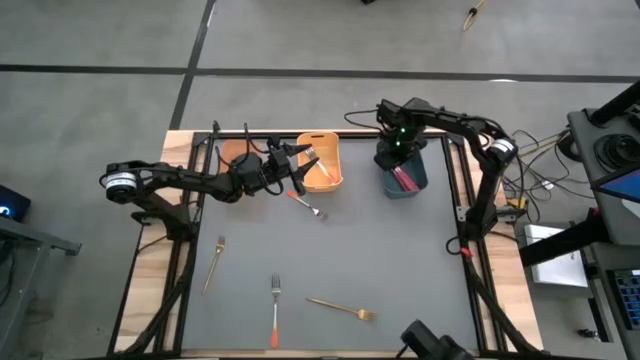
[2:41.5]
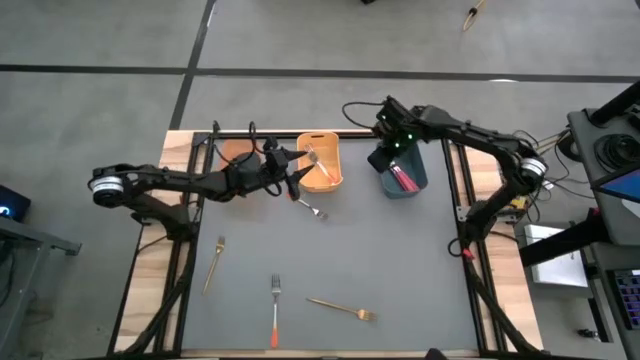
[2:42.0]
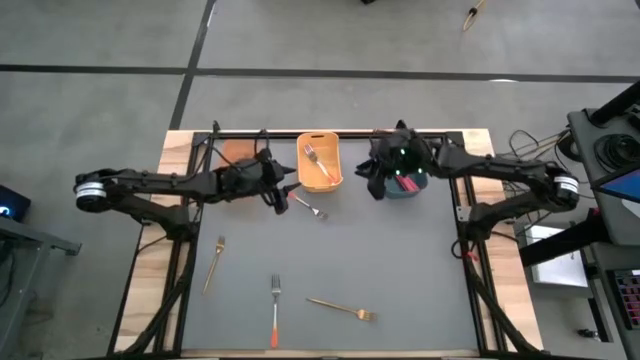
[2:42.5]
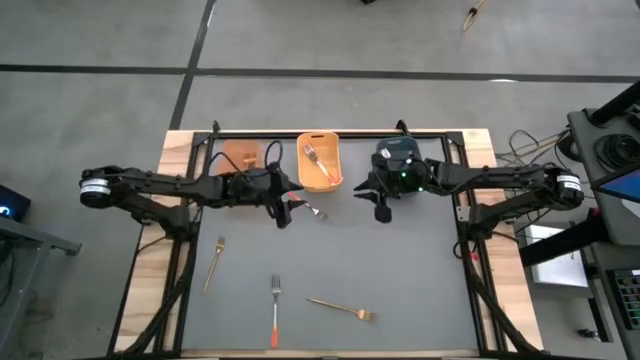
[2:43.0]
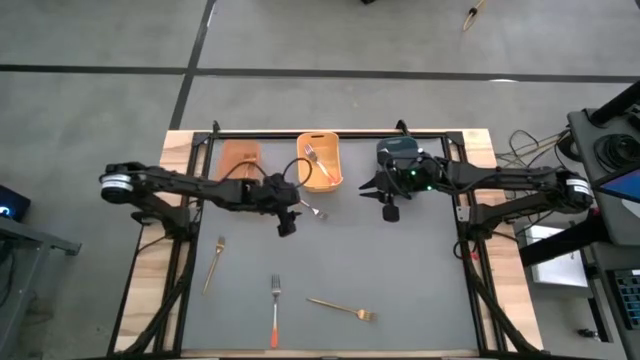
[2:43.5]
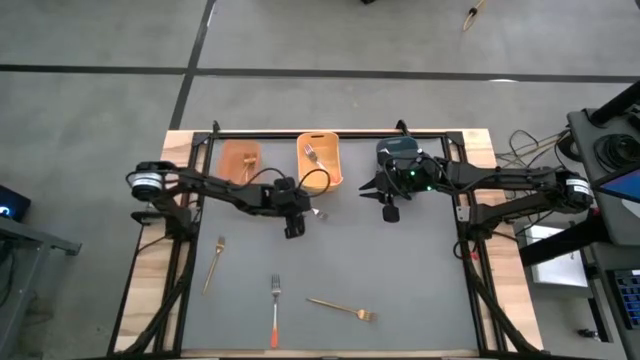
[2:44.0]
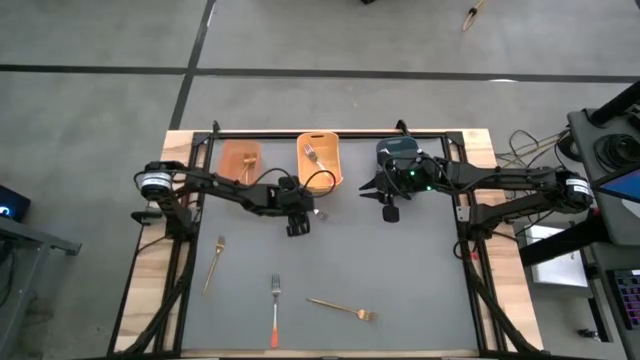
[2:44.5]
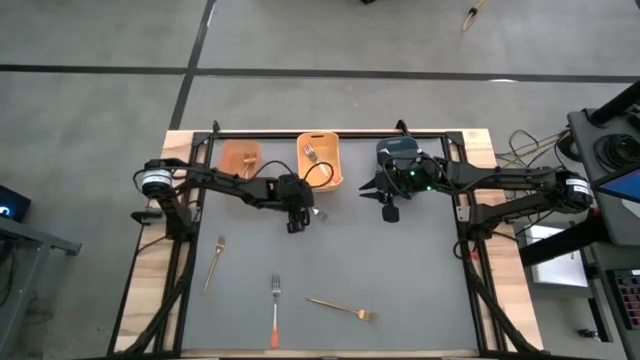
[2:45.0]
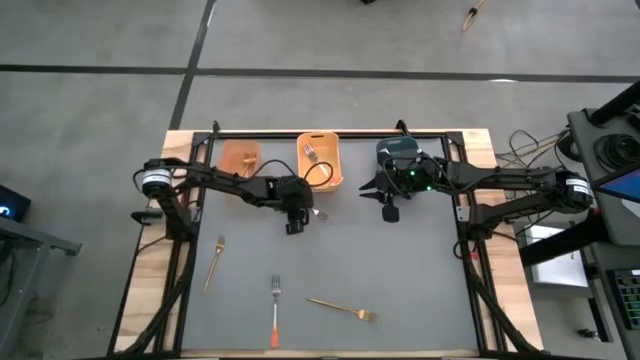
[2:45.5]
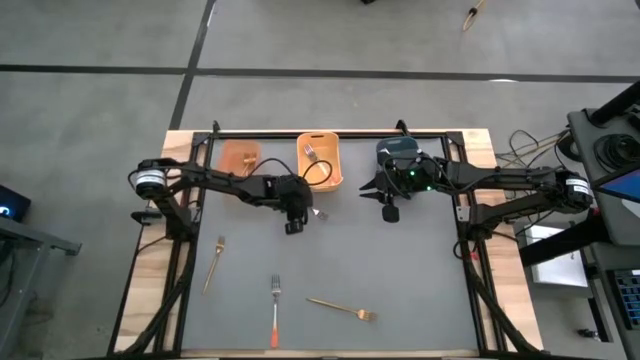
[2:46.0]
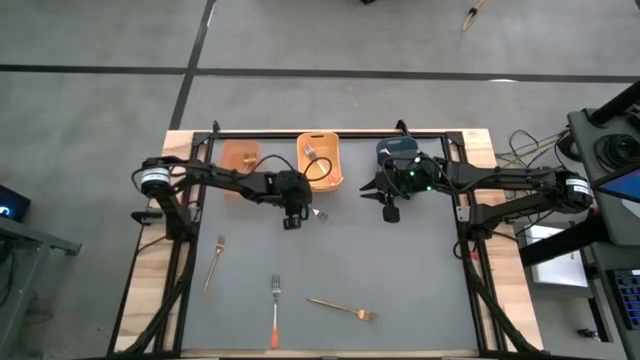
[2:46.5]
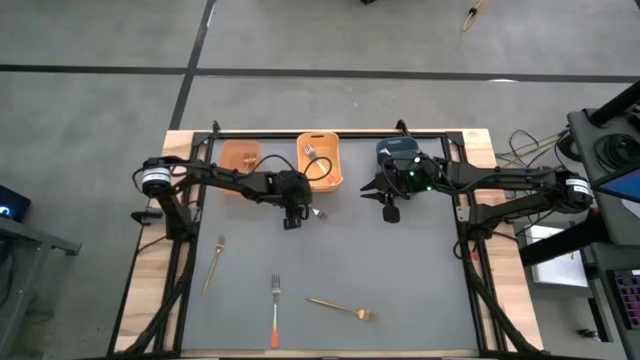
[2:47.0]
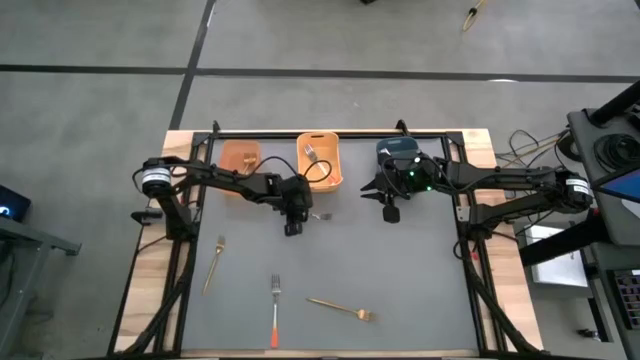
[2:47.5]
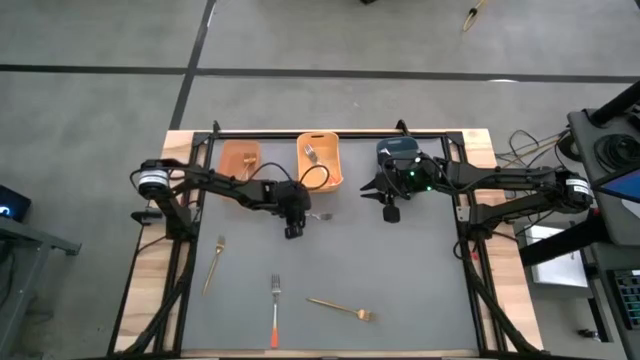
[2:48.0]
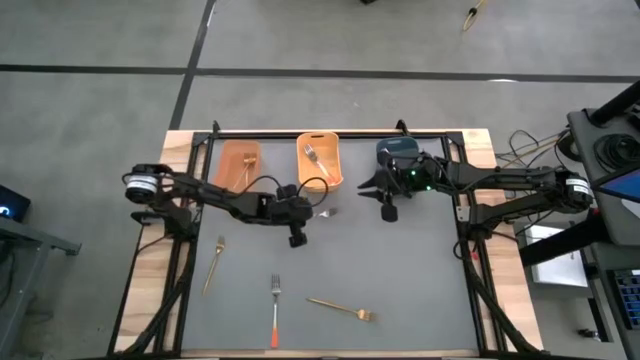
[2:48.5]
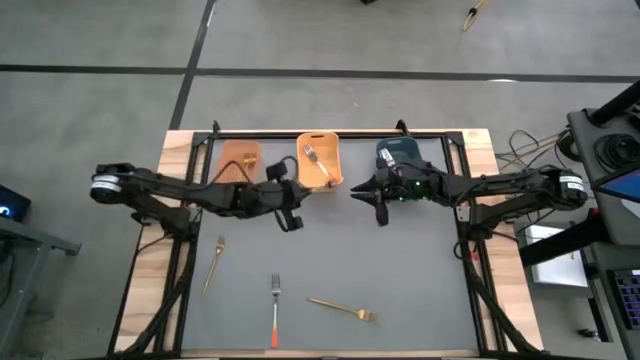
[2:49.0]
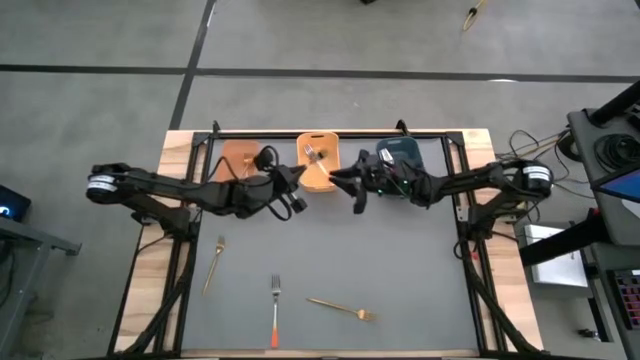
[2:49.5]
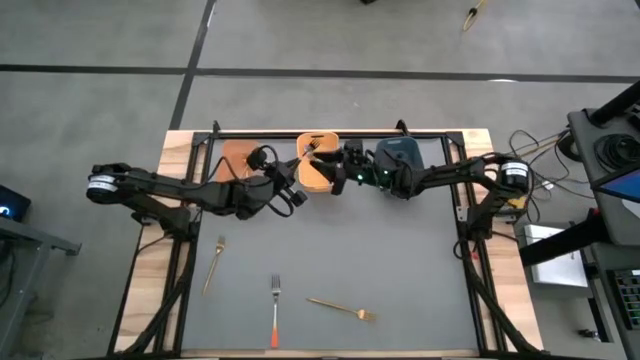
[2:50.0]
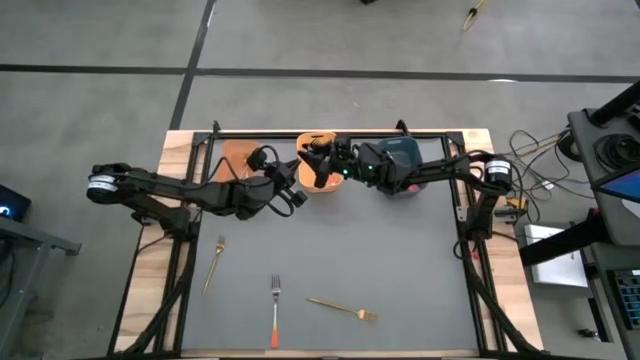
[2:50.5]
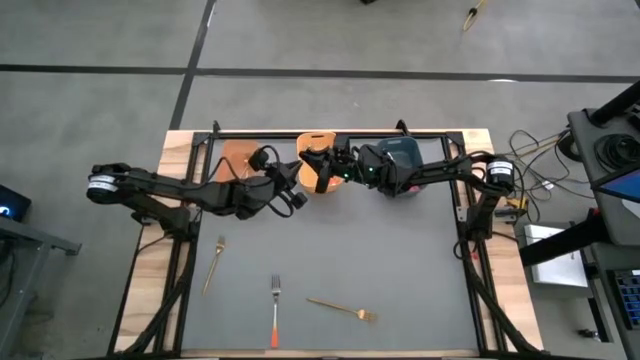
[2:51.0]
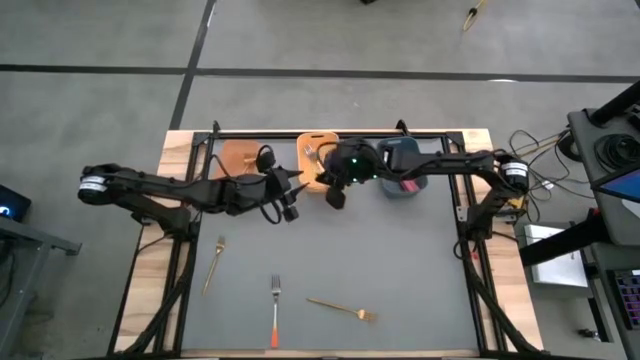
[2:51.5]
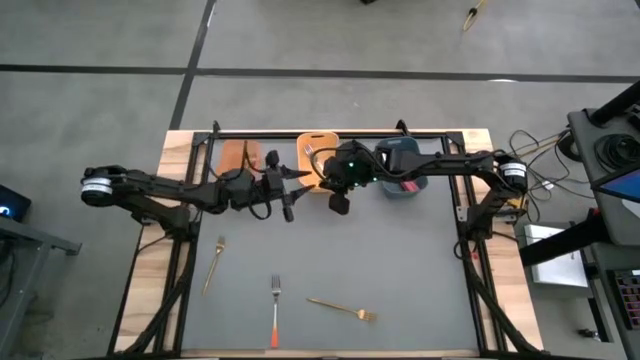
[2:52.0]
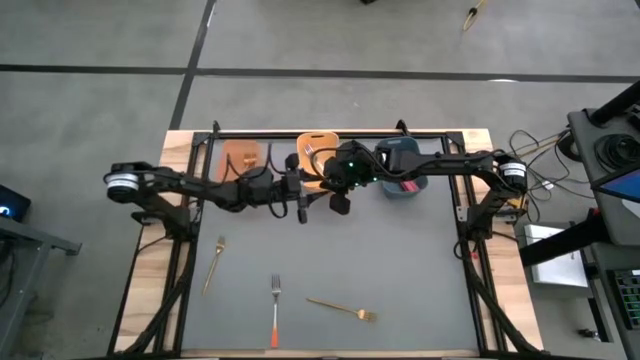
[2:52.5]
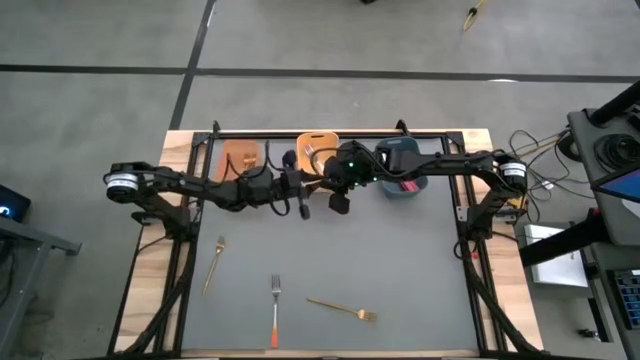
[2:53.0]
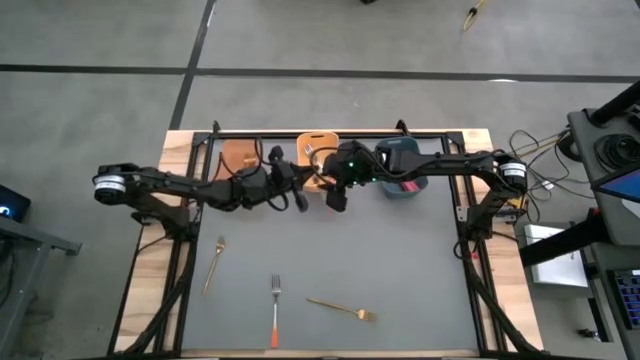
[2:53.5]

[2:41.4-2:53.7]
Task: Sort silverware by color (type)
Put the orange fork into the yellow bin

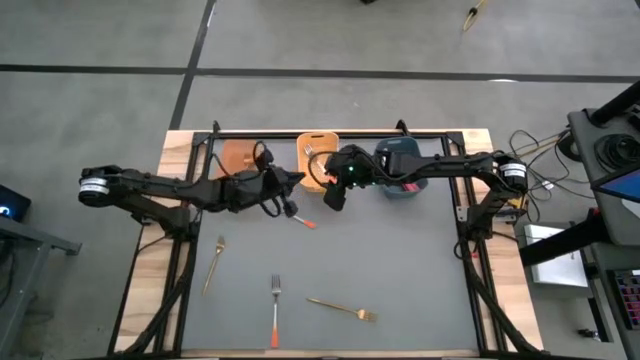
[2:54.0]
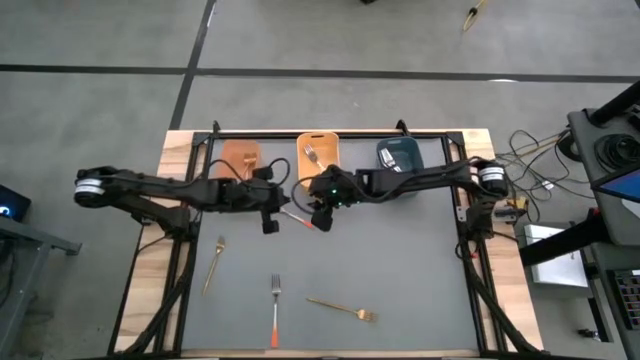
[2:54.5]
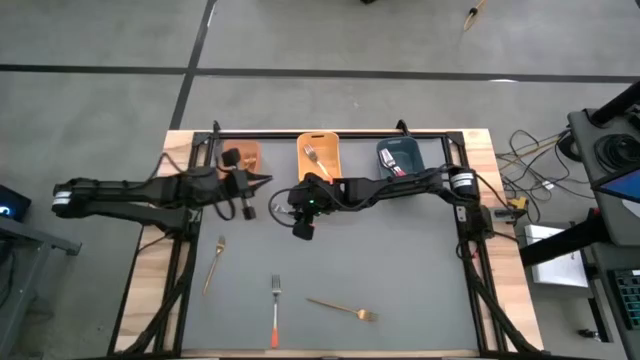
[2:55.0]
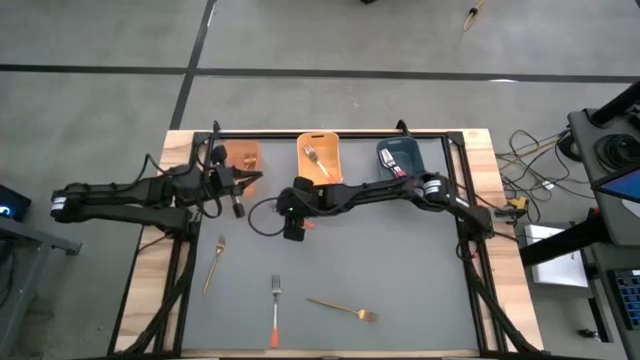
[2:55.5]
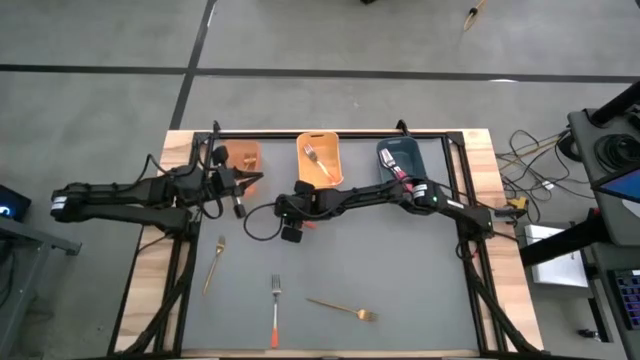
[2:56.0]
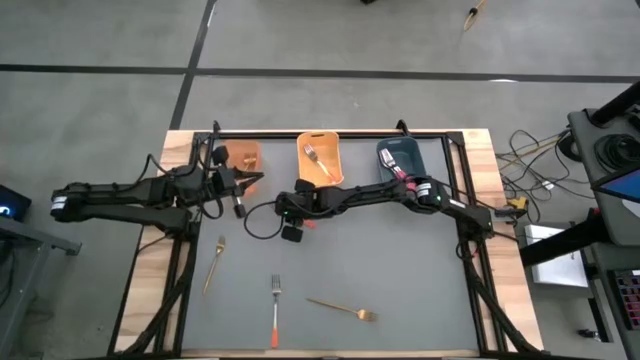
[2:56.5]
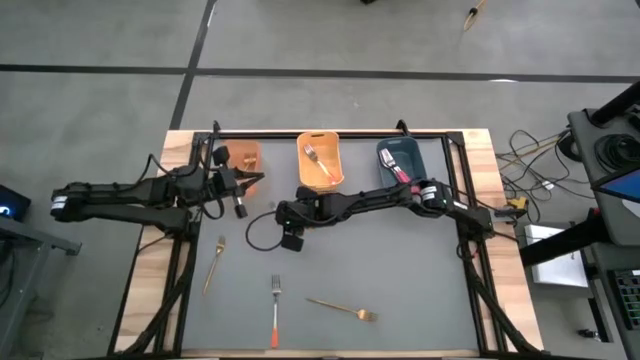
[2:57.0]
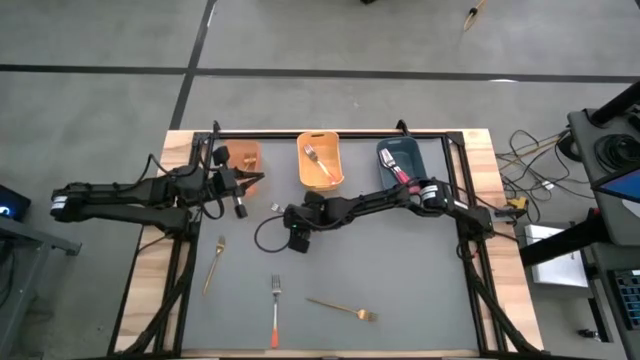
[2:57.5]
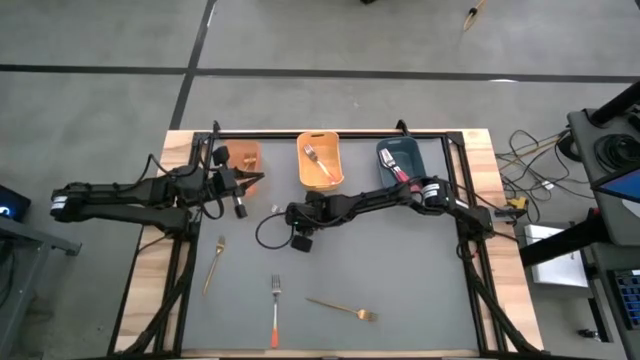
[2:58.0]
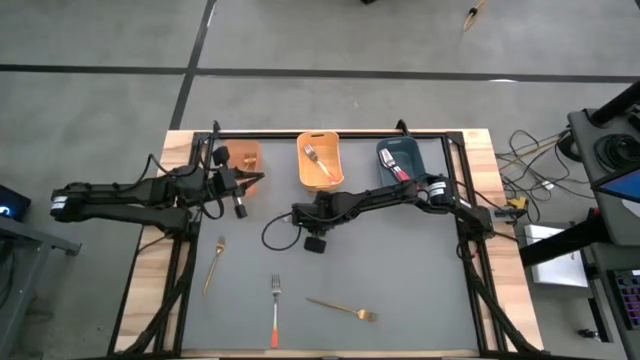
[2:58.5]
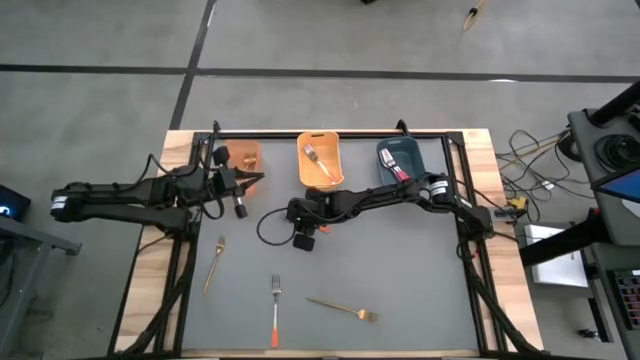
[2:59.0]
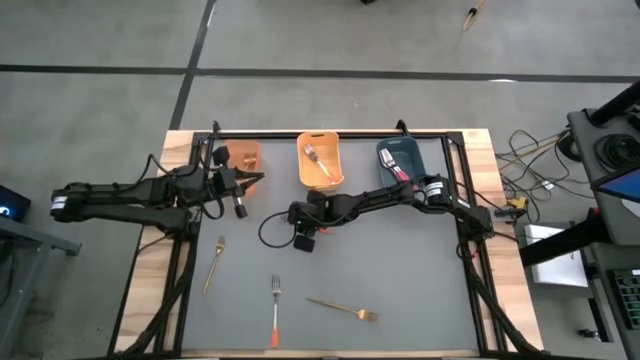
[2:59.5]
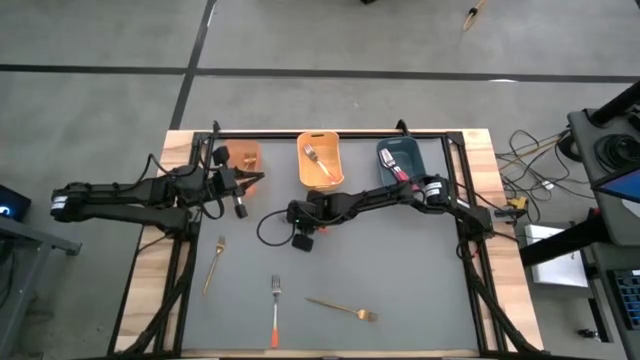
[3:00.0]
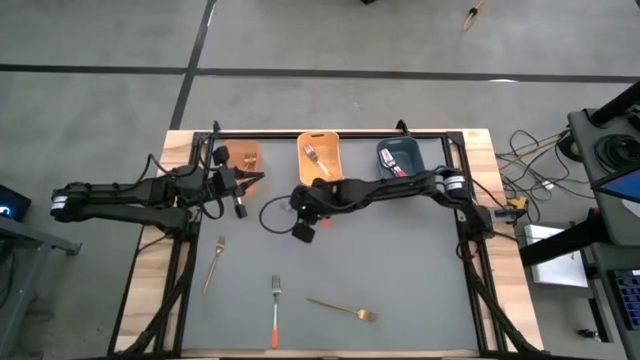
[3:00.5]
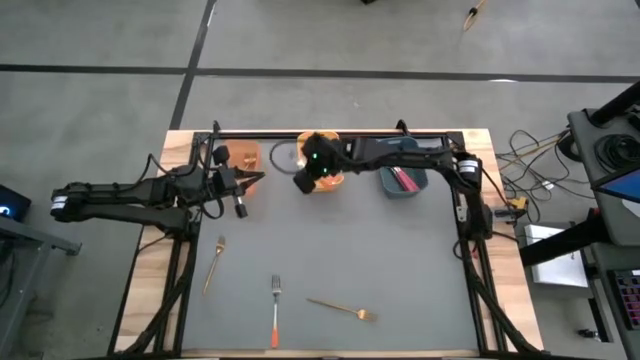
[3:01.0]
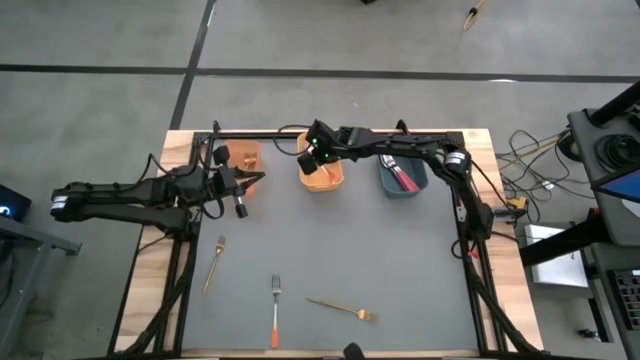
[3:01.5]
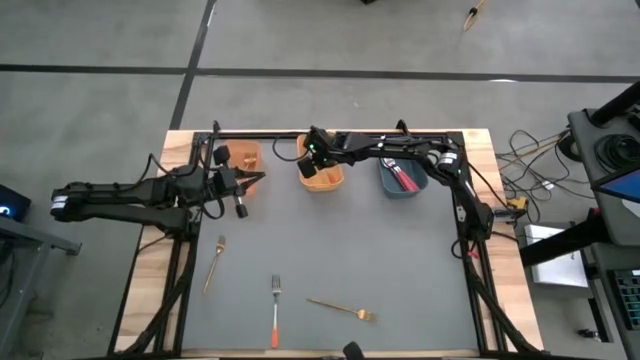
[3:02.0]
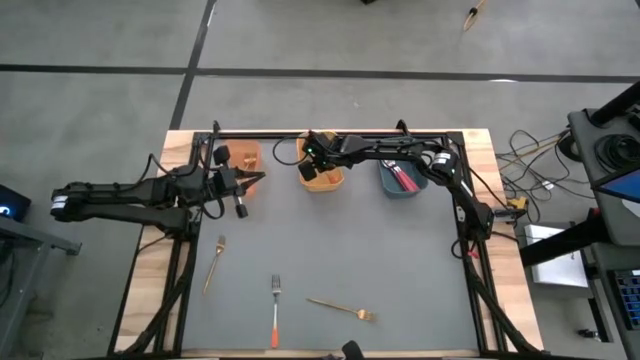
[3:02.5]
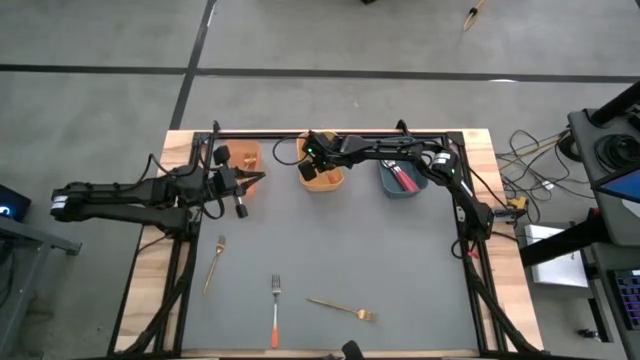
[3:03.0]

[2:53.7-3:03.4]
Put the orange fork into the yellow bin

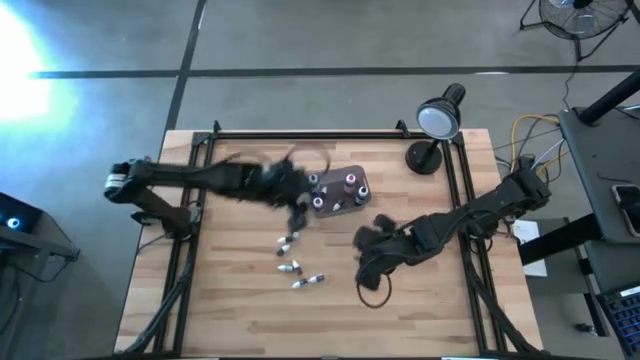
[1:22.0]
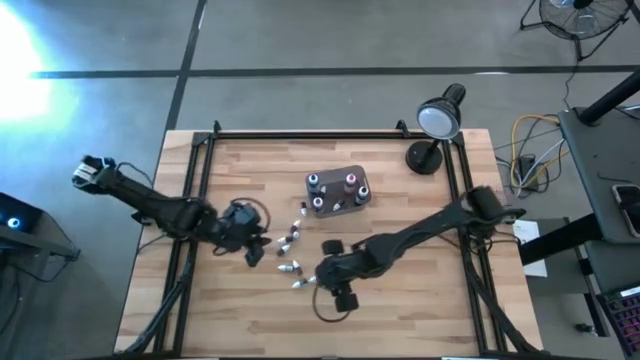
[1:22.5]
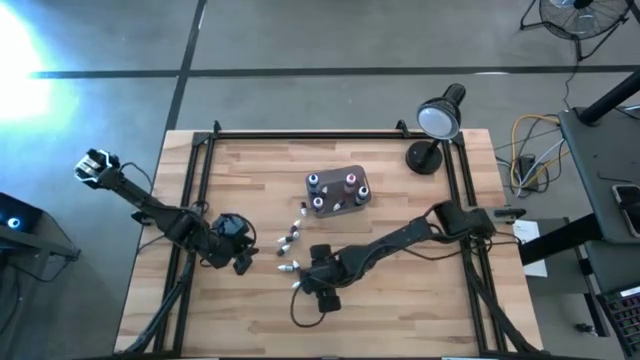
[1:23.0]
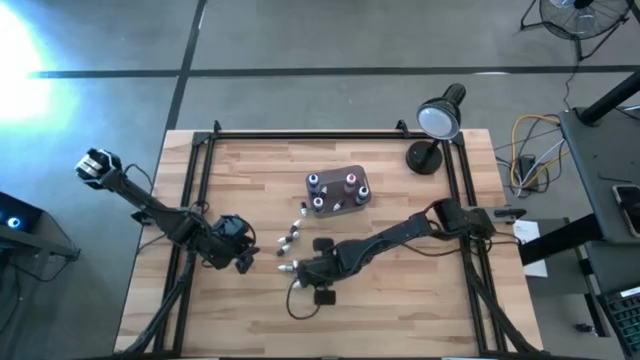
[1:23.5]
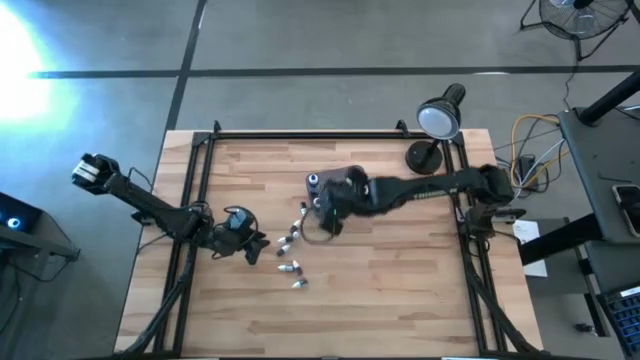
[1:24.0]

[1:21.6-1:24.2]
Task: Pick & Place food coloring
Put the small purple food coloring bottle into the black transparent bin
